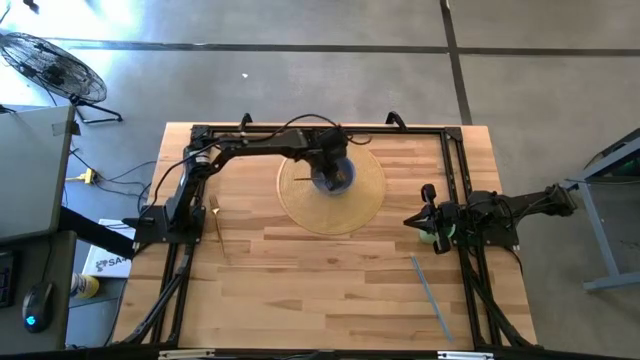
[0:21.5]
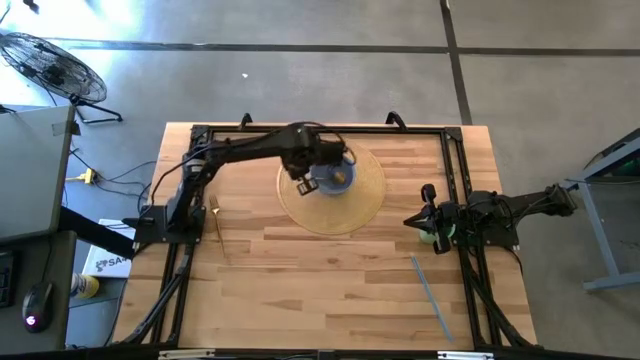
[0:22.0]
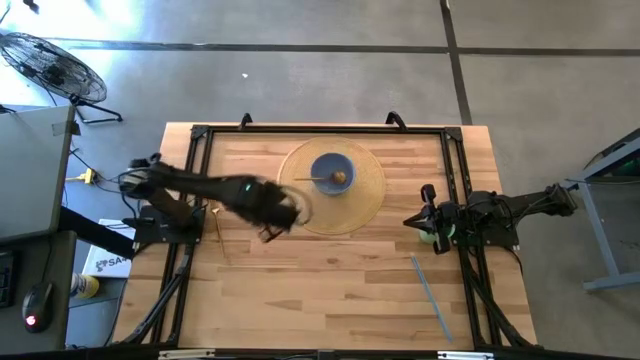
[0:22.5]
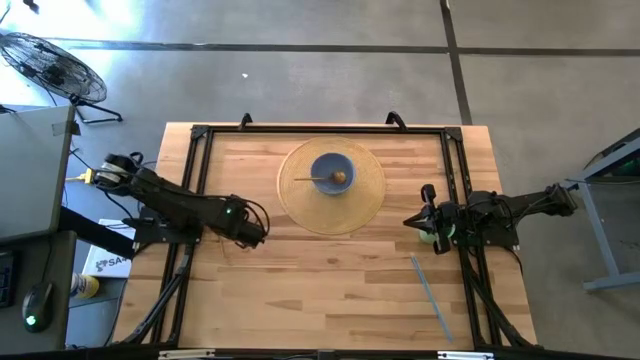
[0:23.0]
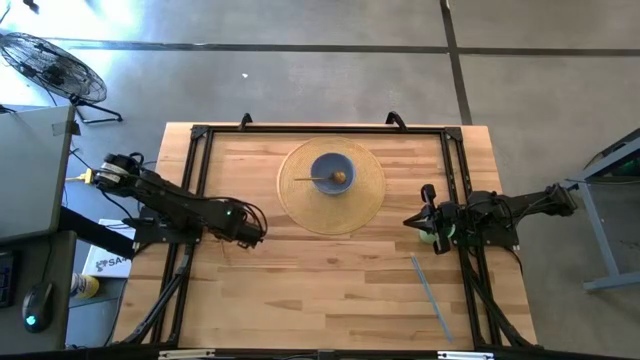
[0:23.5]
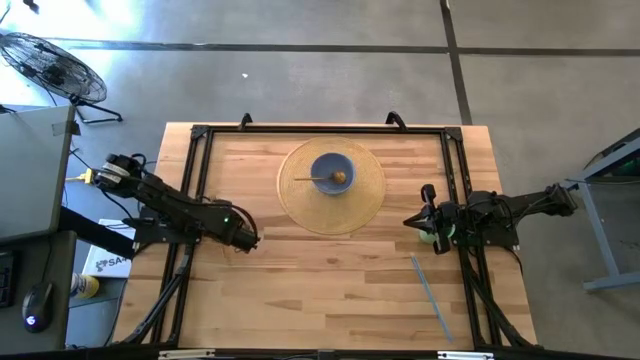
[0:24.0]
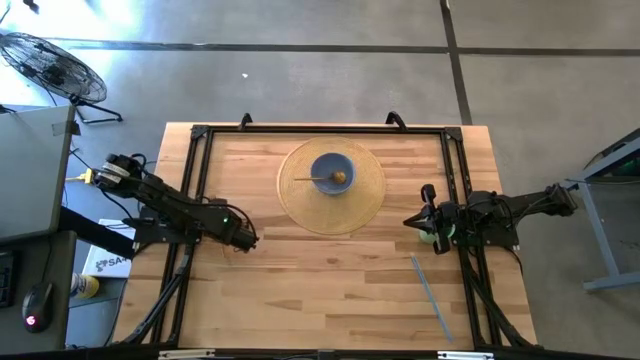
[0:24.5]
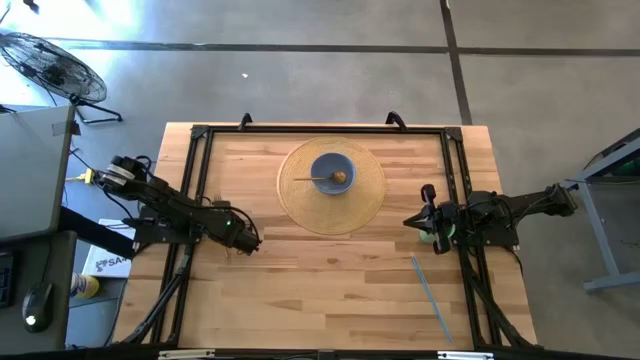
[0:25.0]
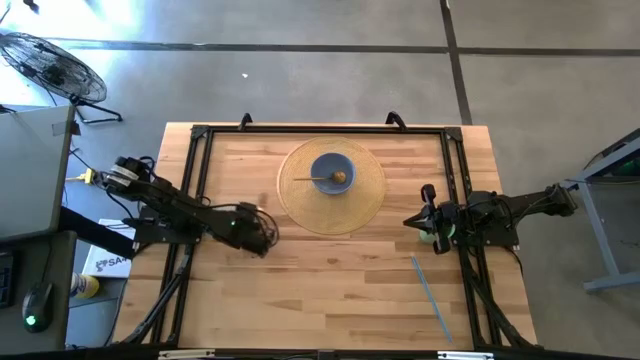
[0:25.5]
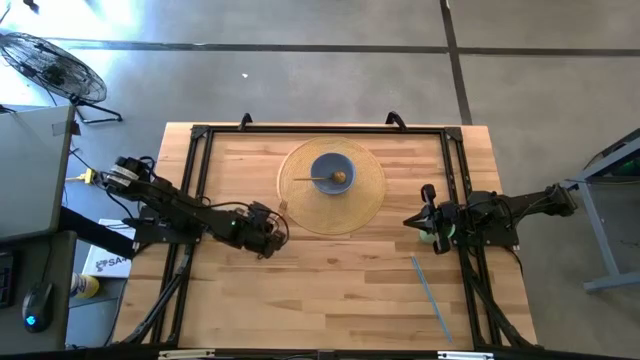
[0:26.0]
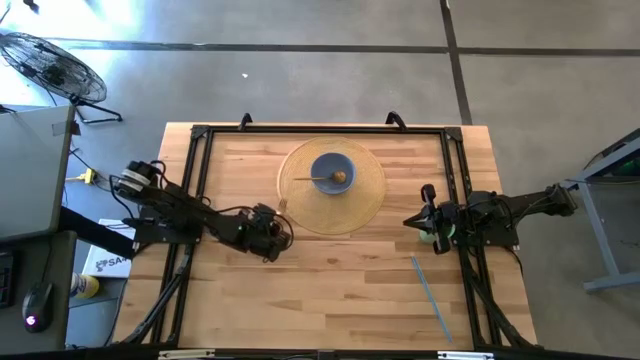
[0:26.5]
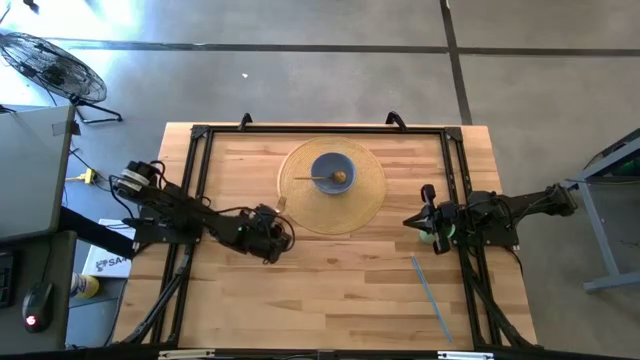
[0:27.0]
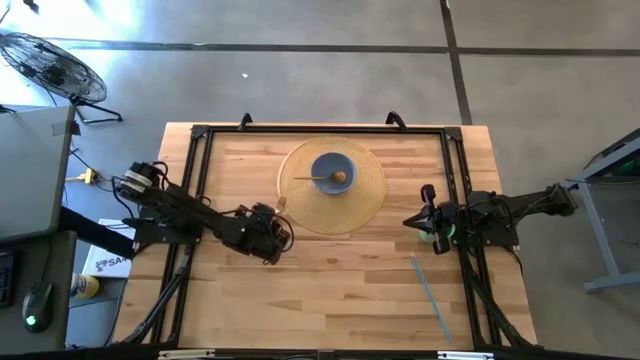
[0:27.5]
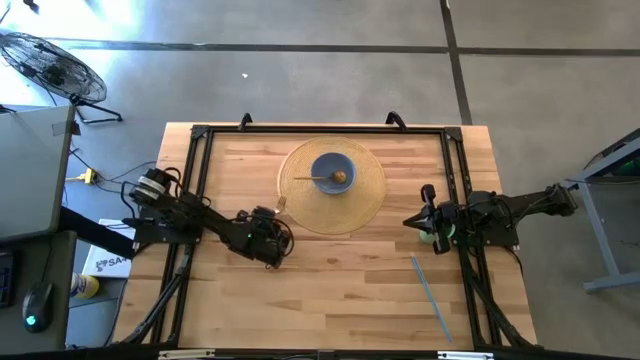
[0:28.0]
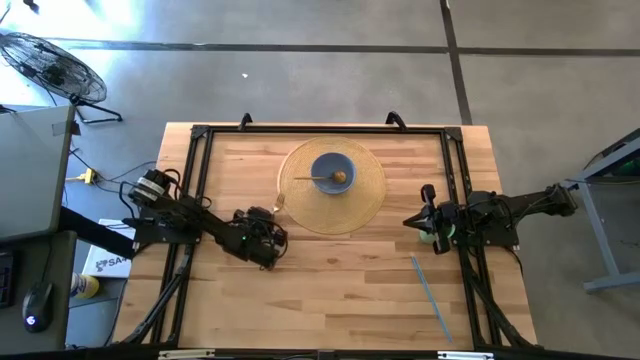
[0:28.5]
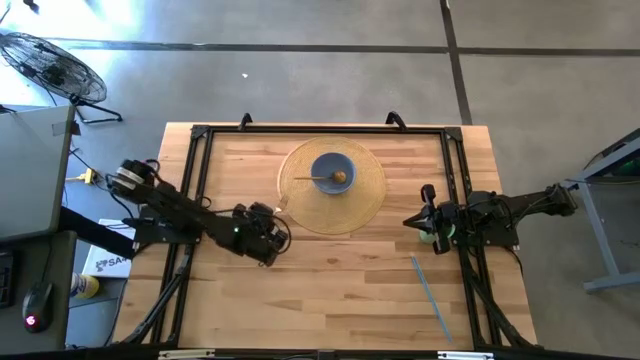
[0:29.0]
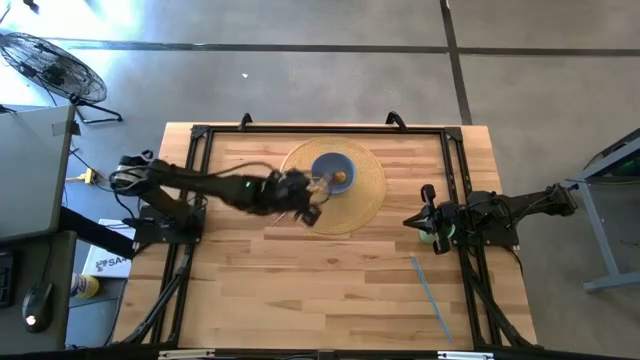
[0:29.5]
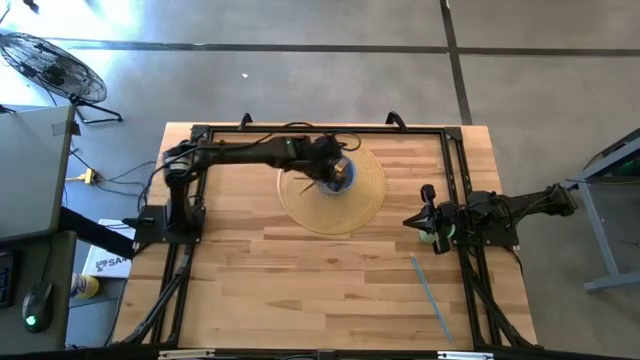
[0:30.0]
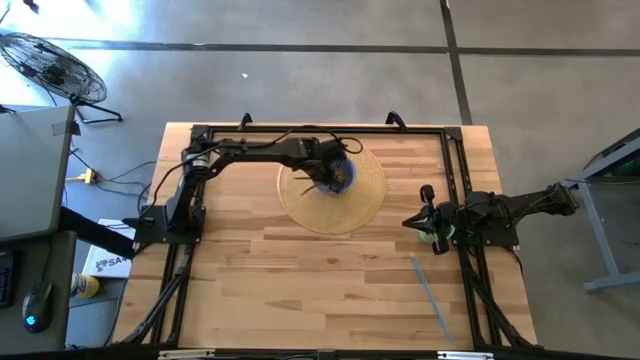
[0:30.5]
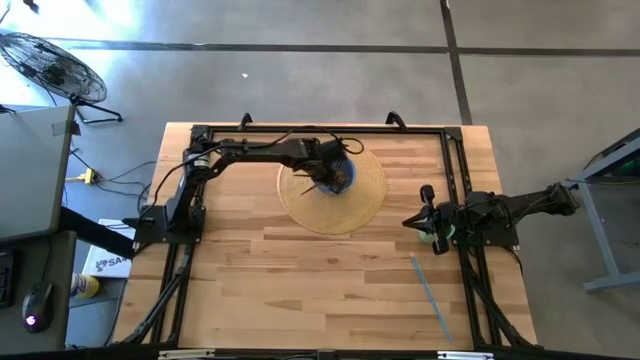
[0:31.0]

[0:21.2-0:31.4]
Task: Pick & Place Utensil
Put the gold fork into the blue bowl on the brown mat

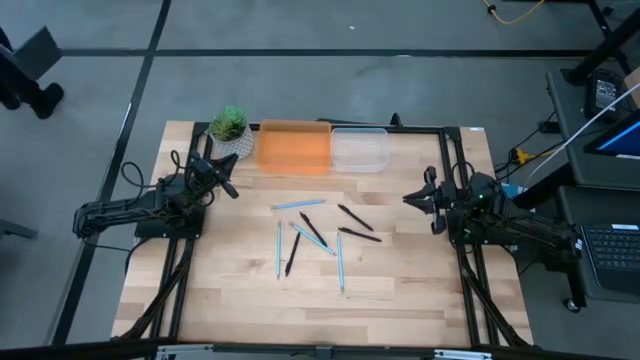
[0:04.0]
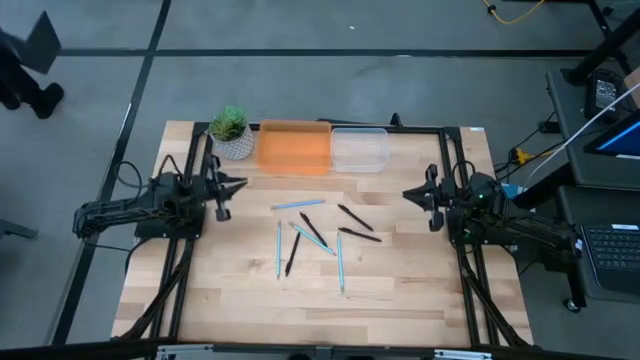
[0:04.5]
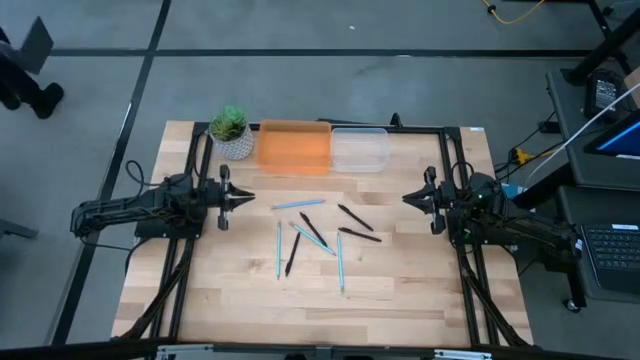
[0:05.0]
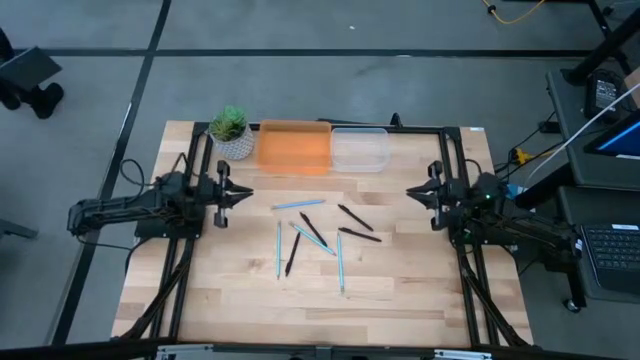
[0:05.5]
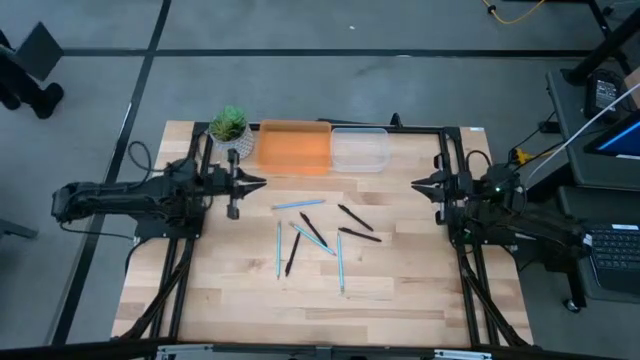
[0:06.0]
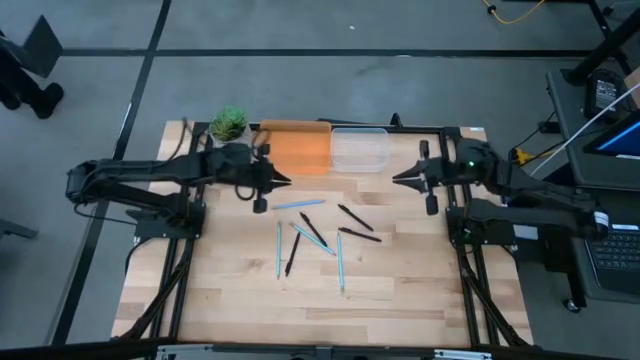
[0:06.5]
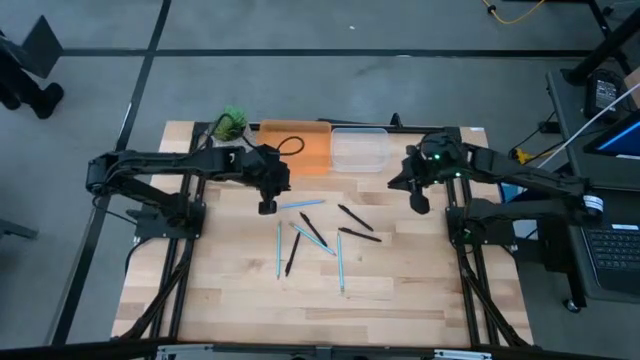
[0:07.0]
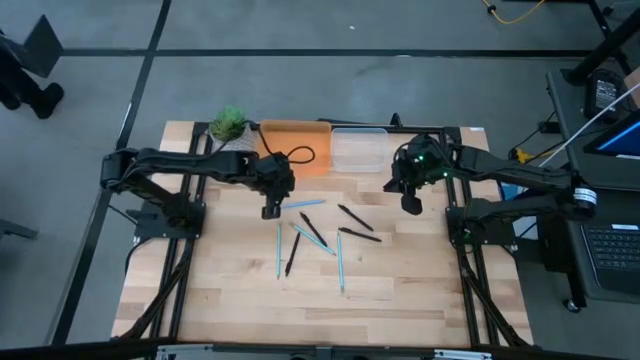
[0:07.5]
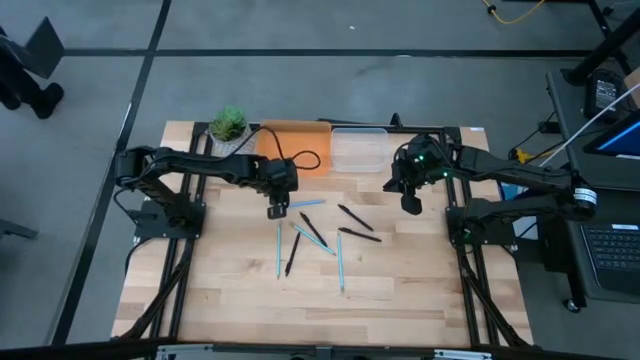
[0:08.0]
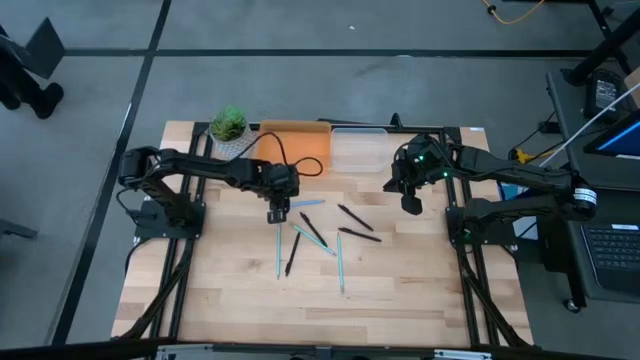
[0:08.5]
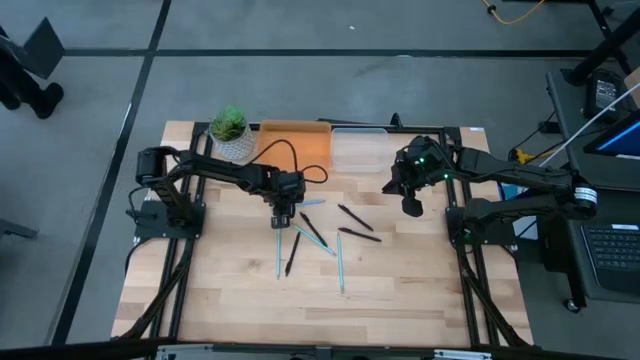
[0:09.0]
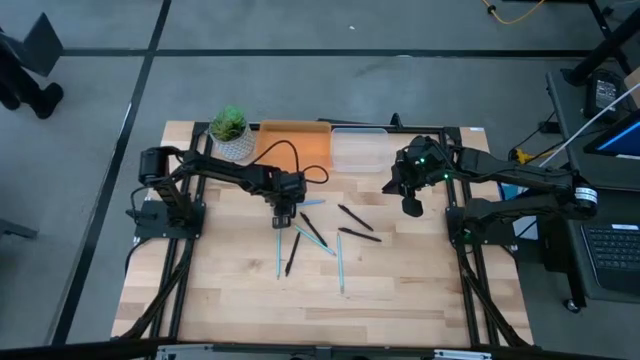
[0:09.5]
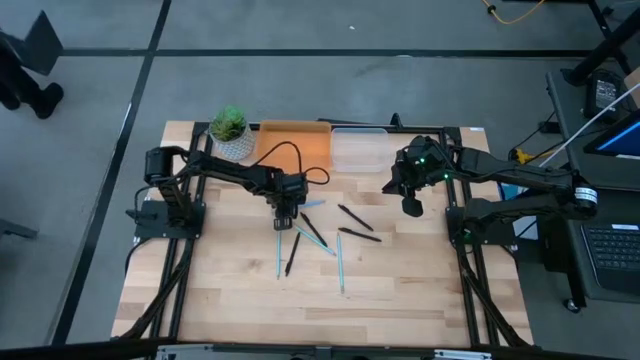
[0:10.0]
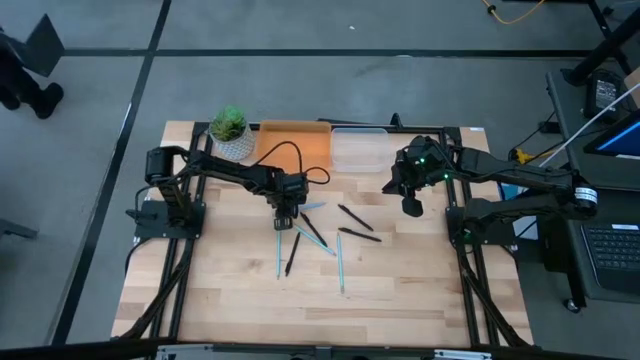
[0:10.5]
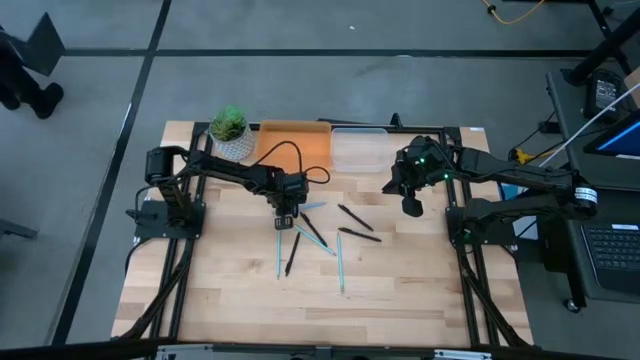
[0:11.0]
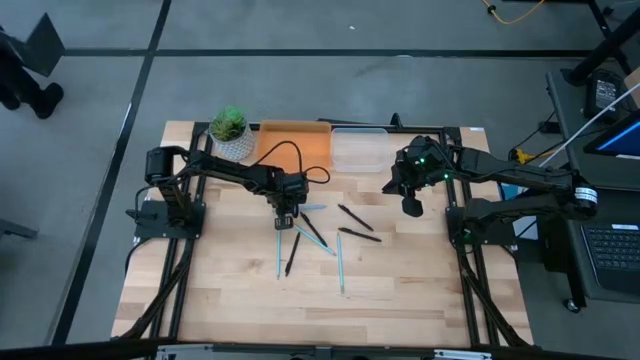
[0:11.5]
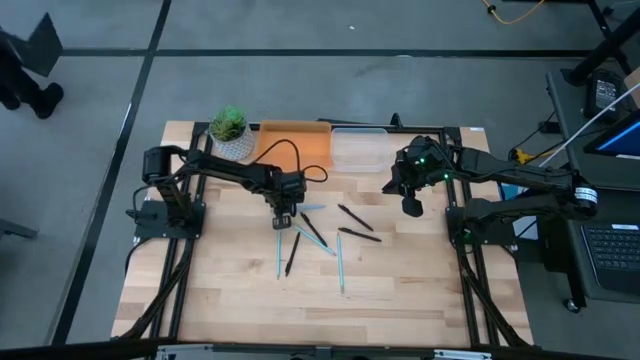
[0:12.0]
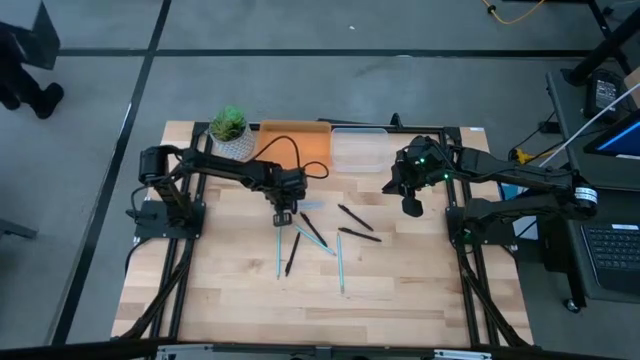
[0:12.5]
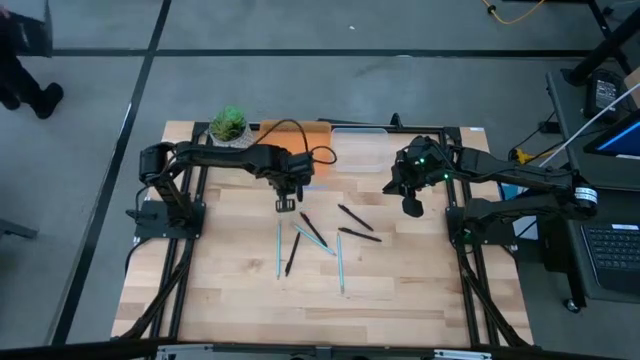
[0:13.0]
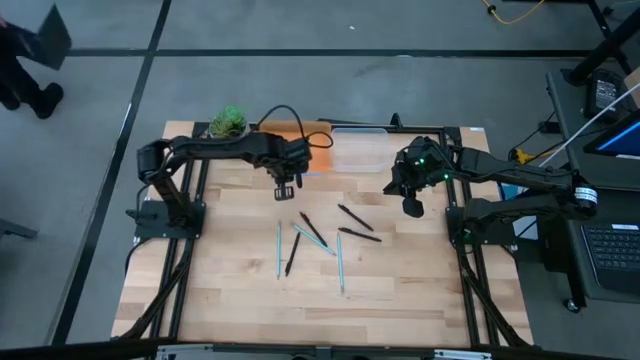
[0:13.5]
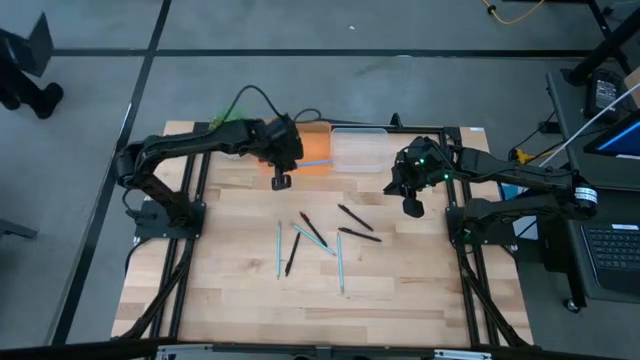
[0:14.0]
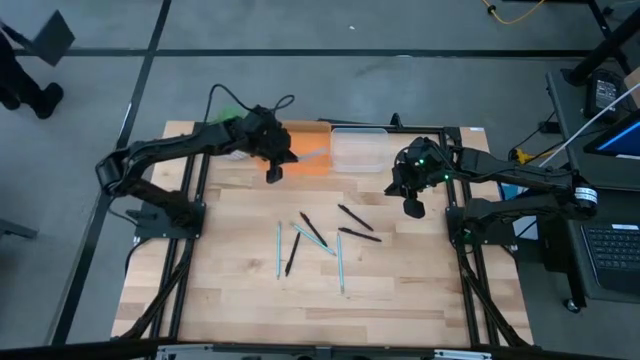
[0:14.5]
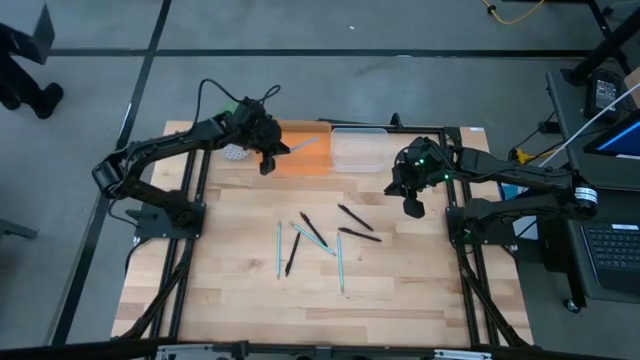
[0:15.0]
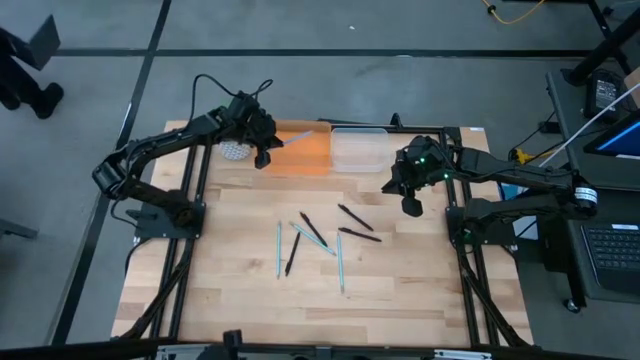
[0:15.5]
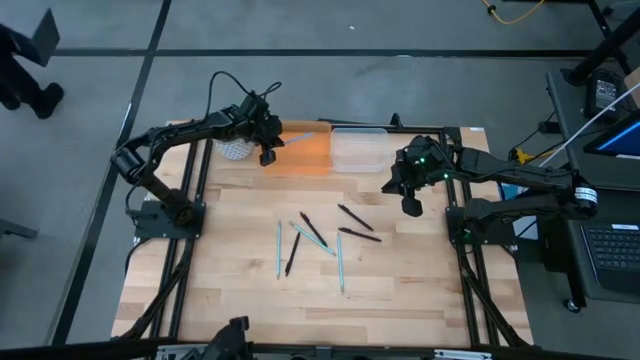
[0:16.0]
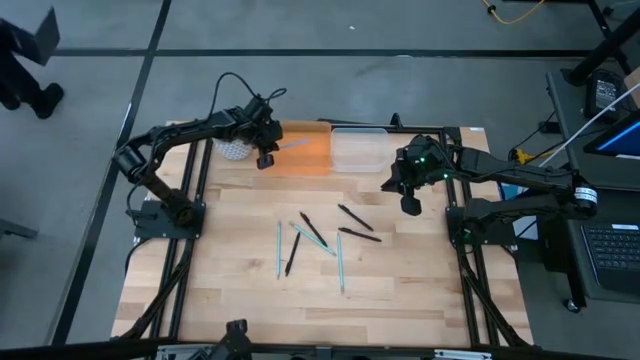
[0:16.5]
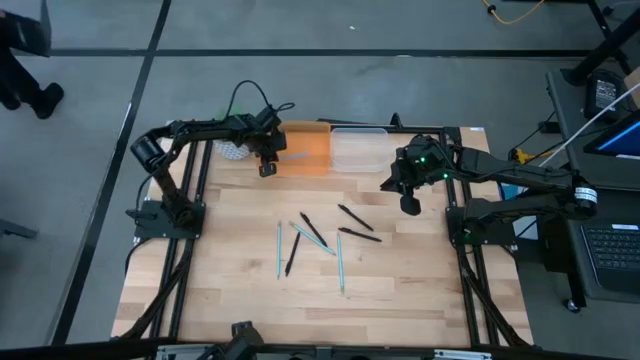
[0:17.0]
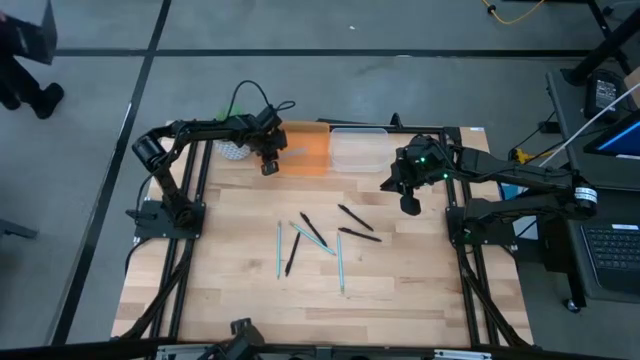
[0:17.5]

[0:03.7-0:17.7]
Task: Sort pens & pencils
Put the blue pencil into the orange bin
